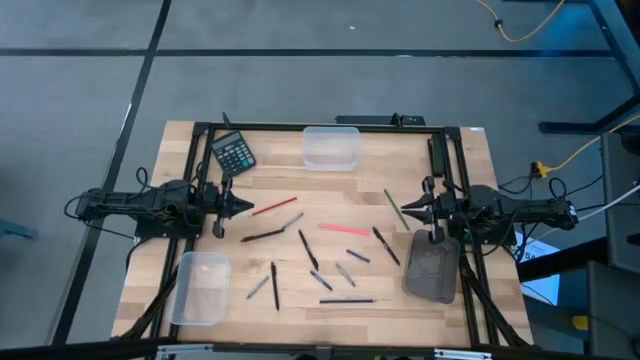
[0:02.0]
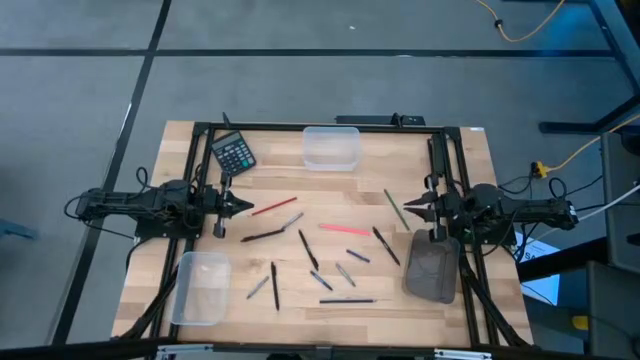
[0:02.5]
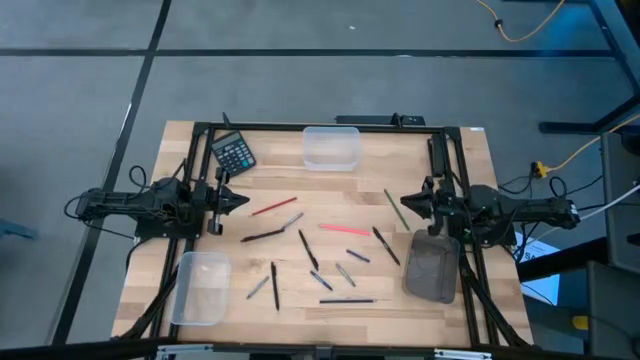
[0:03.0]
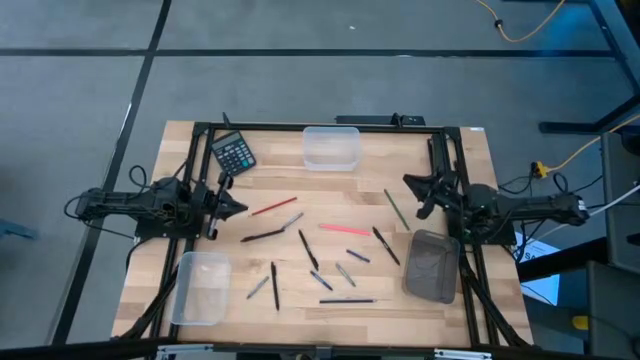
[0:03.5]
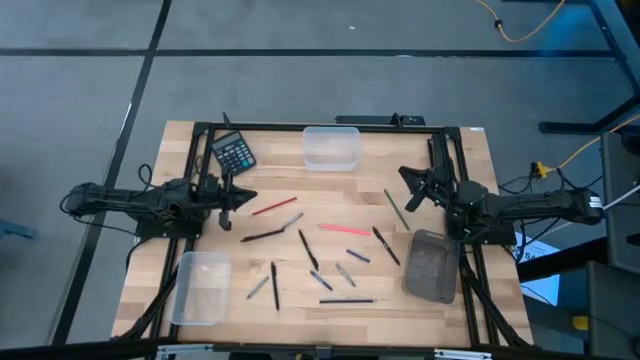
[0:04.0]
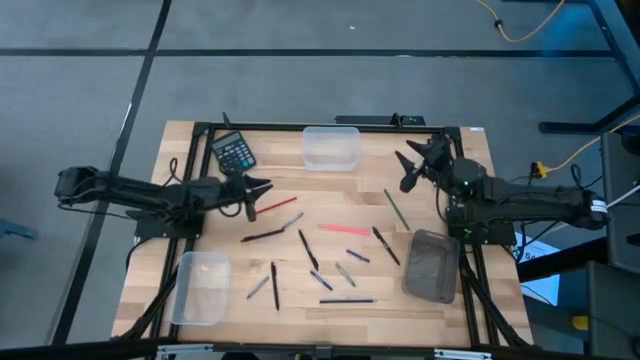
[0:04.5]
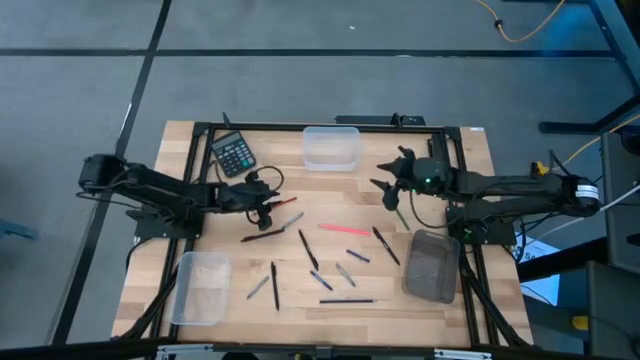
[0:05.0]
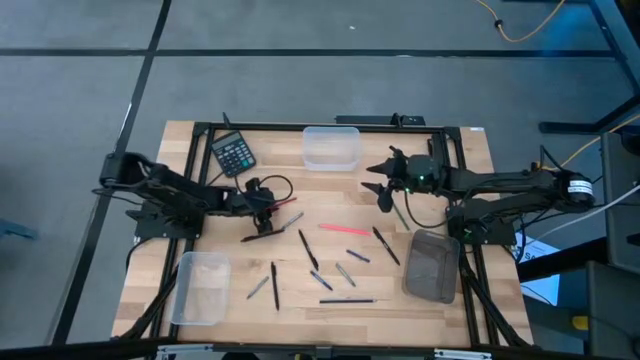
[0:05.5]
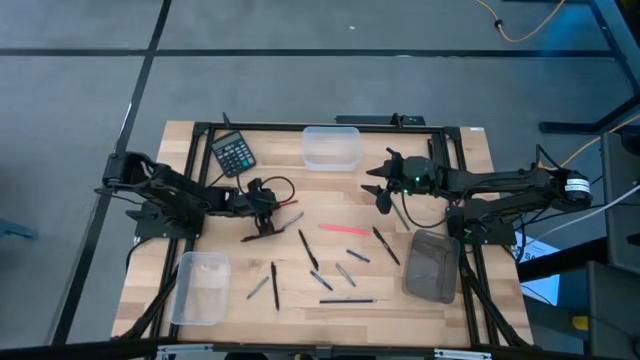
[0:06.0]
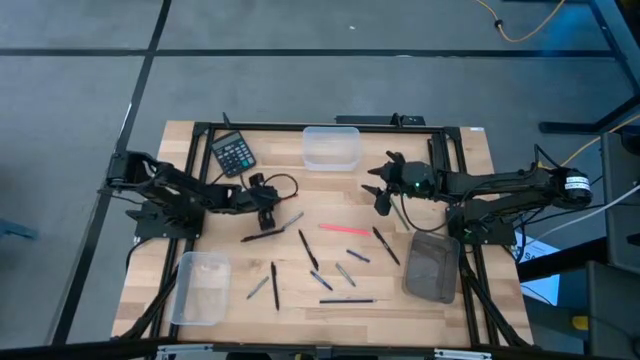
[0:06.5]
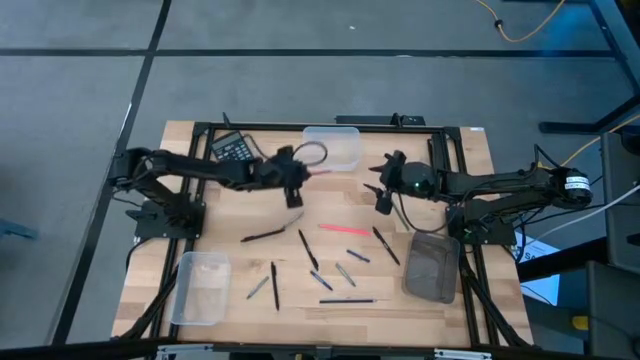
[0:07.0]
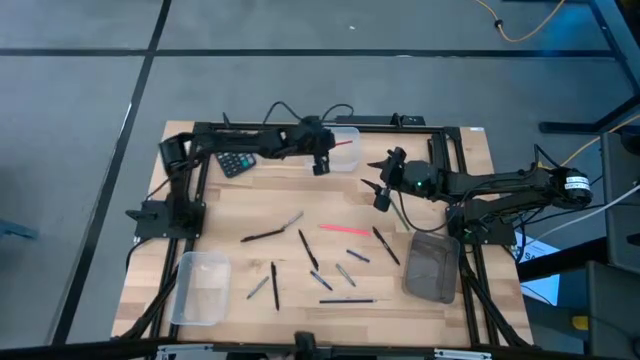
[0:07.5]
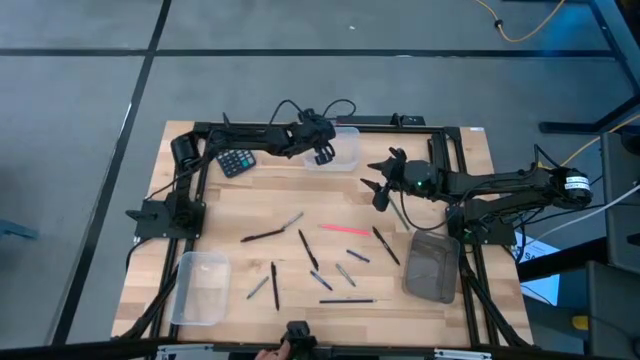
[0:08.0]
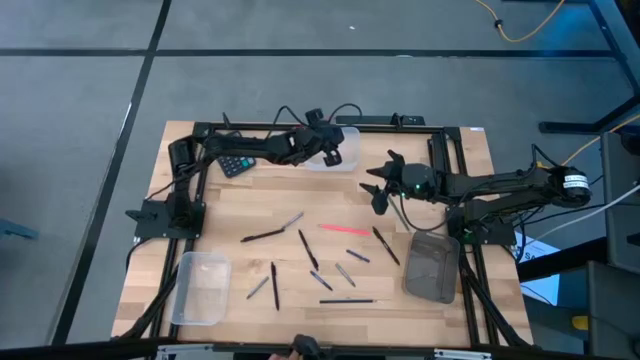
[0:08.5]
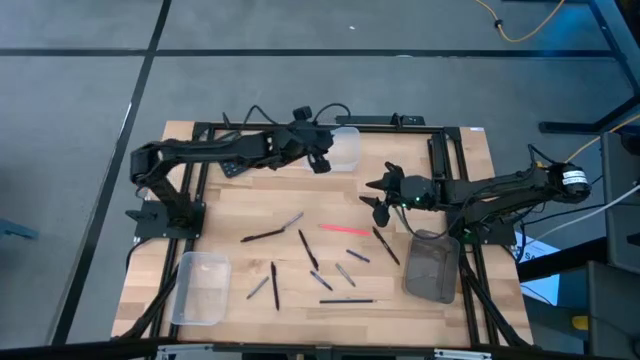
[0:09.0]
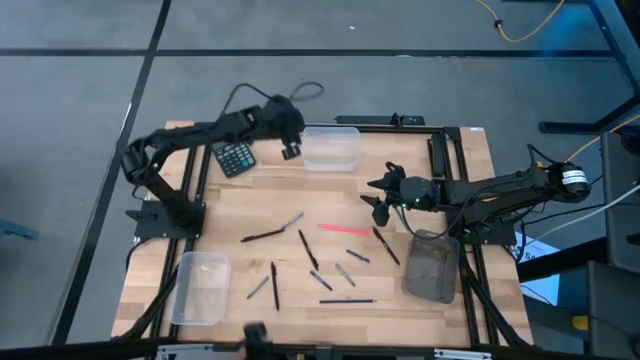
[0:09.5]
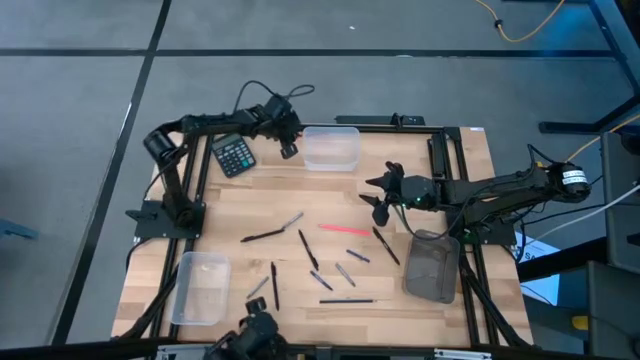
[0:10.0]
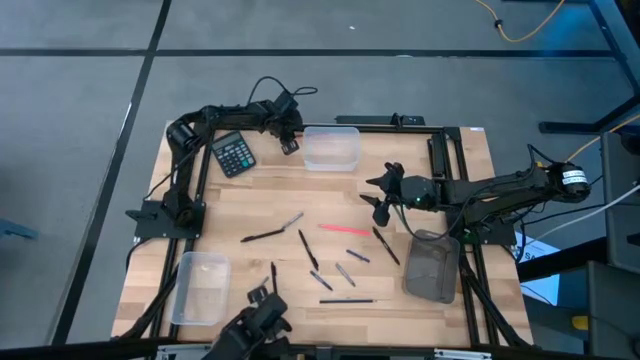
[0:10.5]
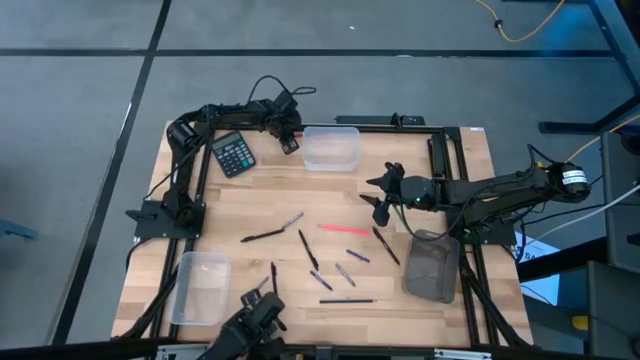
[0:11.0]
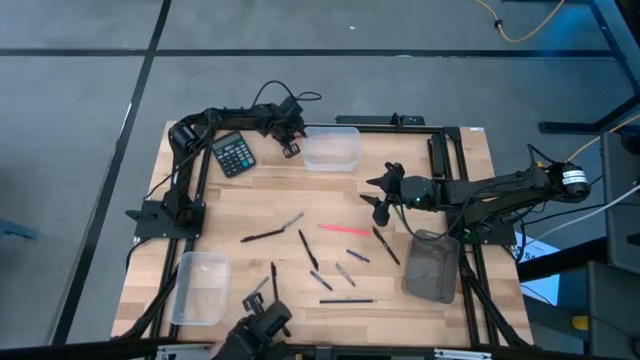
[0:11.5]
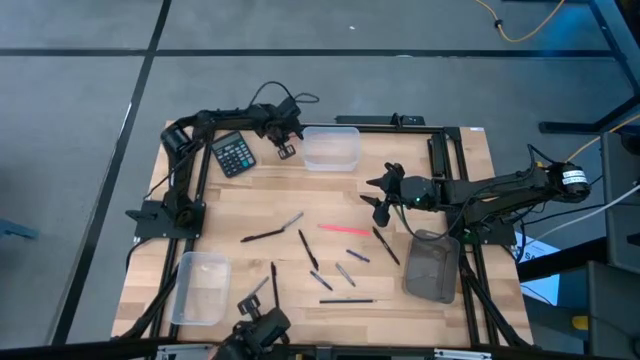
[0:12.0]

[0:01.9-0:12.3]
Task: Sort crayons/erasers/pens/pencils in bins
Put the red pencil into the top transparent bin

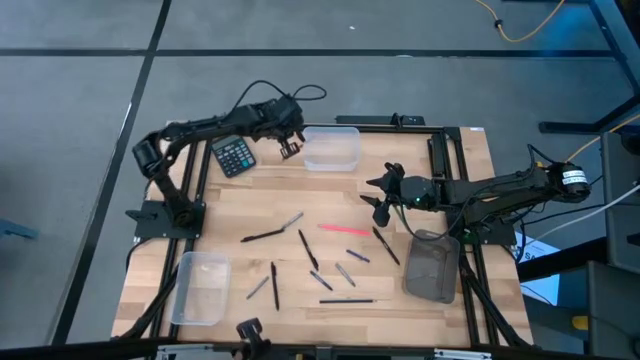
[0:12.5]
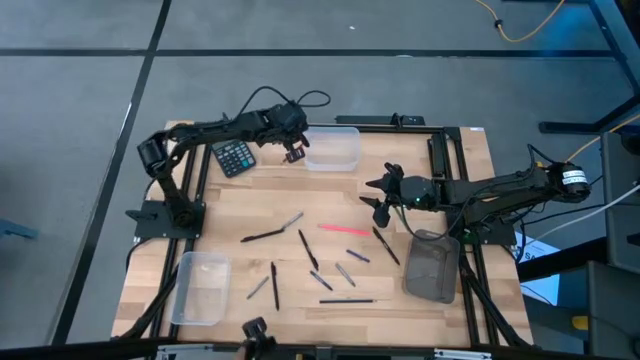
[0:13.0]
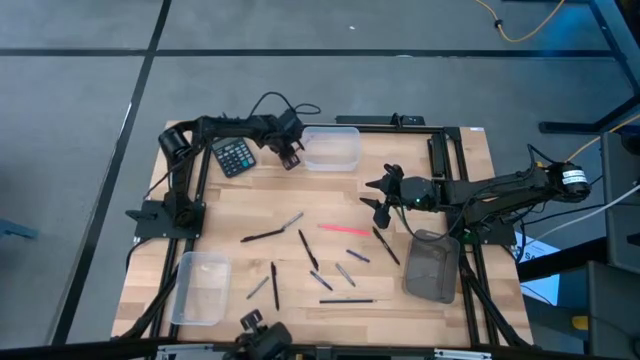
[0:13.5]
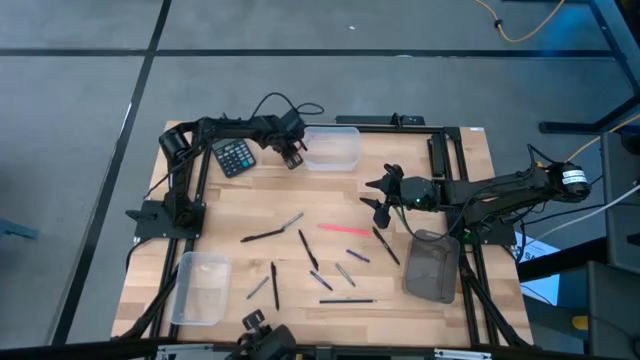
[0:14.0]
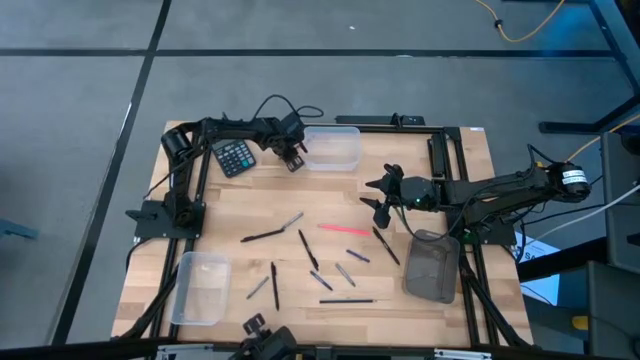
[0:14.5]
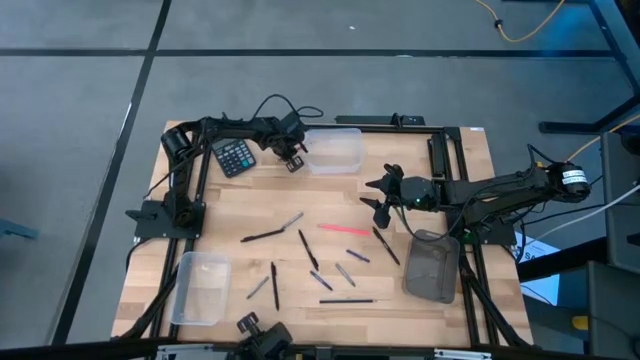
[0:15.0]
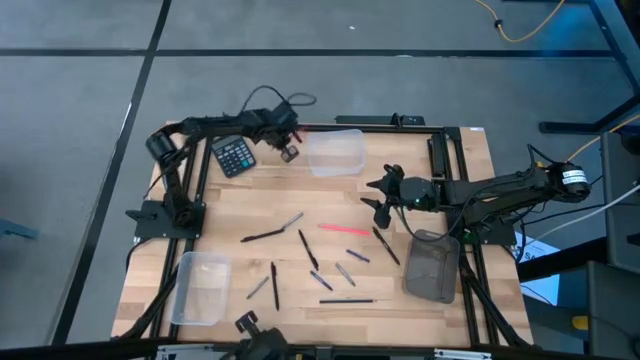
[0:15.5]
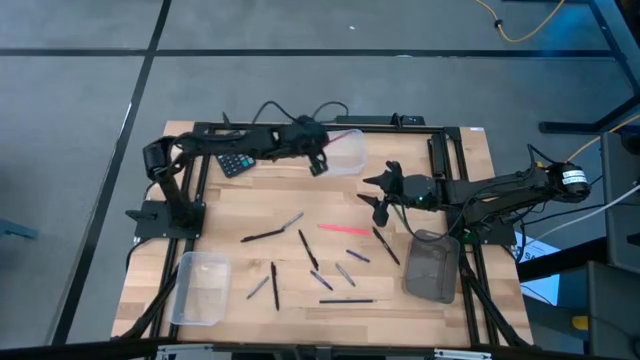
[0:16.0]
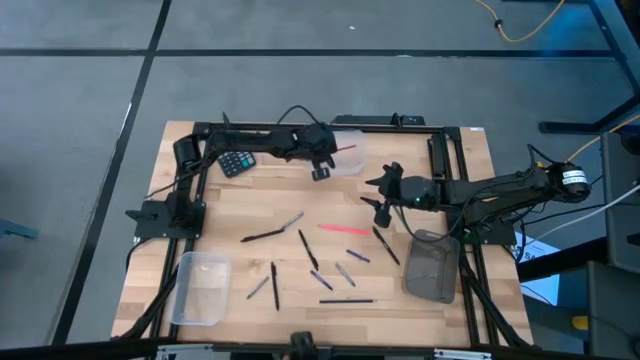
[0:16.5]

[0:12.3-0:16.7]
Put the red pencil into the top transparent bin

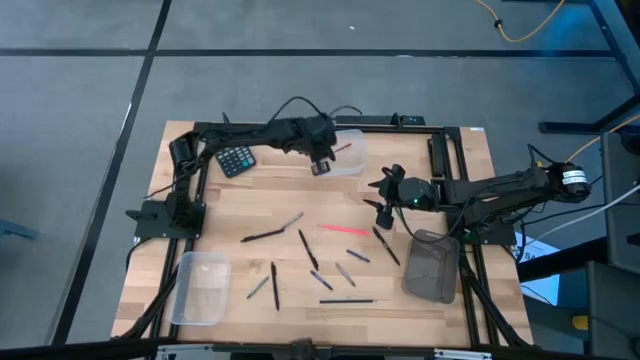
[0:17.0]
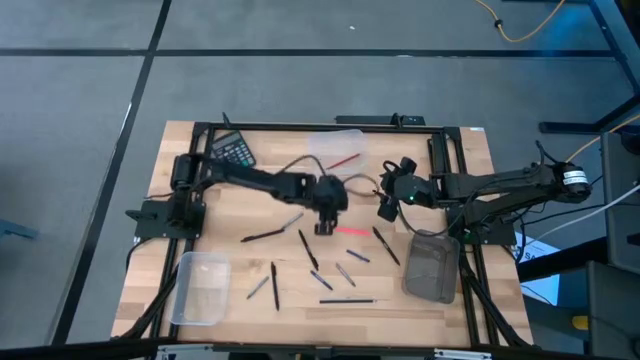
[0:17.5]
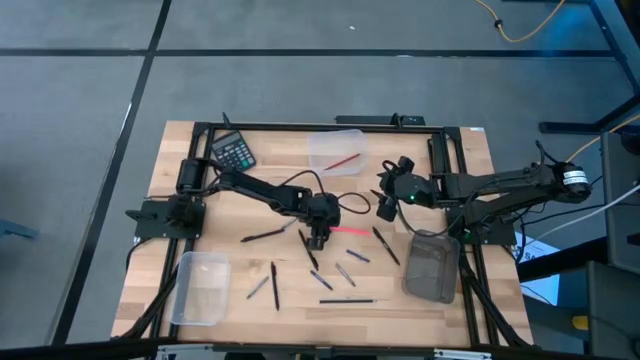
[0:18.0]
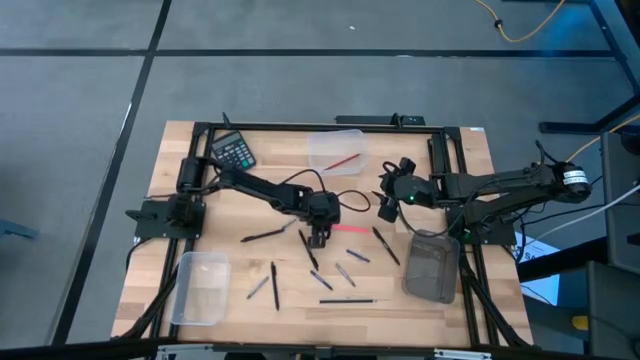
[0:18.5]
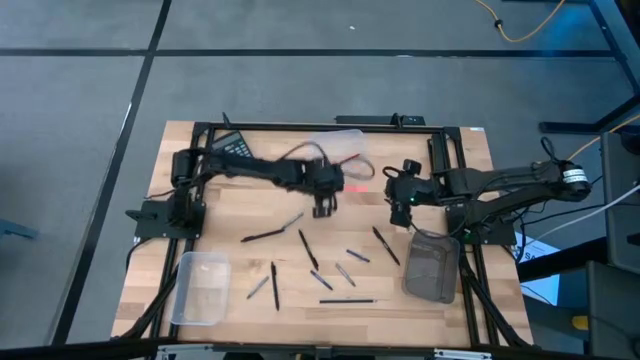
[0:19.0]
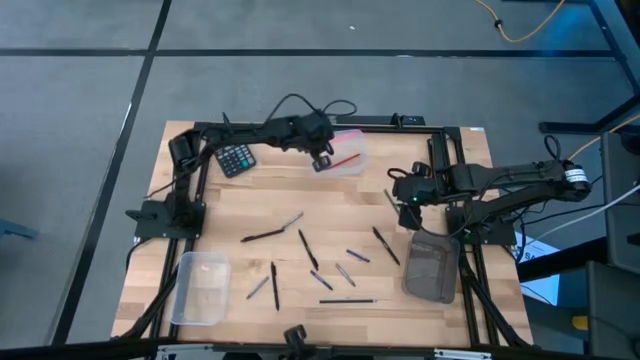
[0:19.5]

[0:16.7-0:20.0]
Put the pink pencil into the top transparent bin

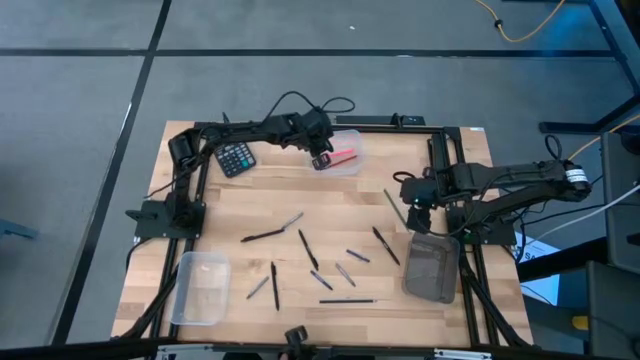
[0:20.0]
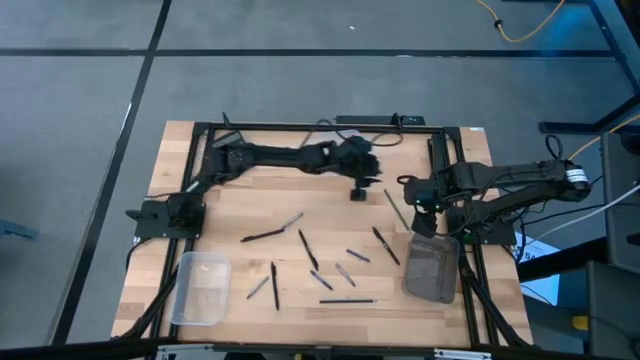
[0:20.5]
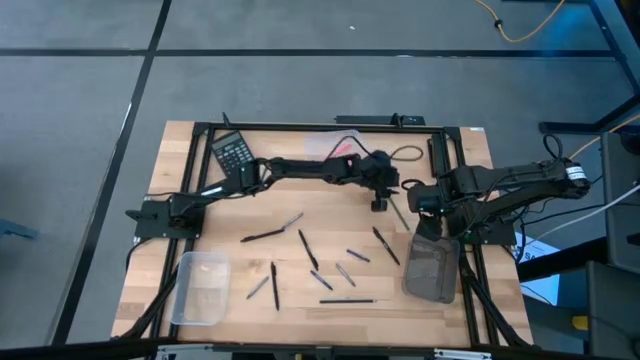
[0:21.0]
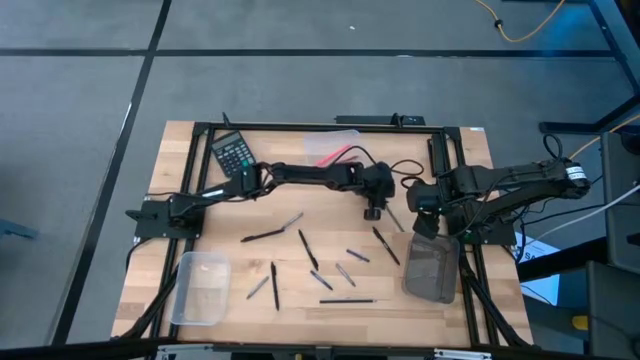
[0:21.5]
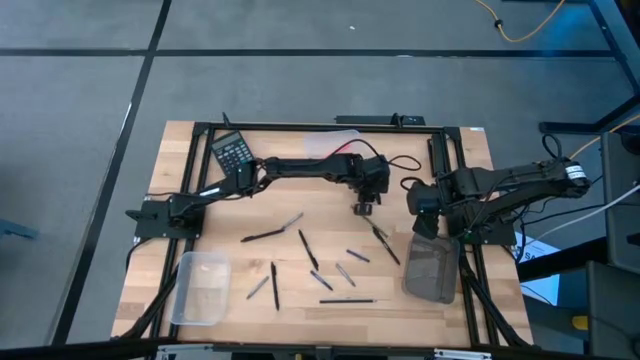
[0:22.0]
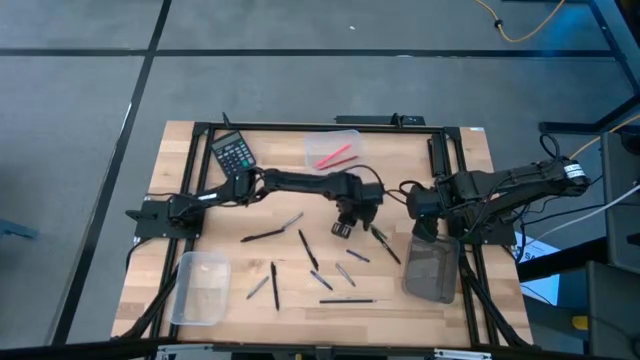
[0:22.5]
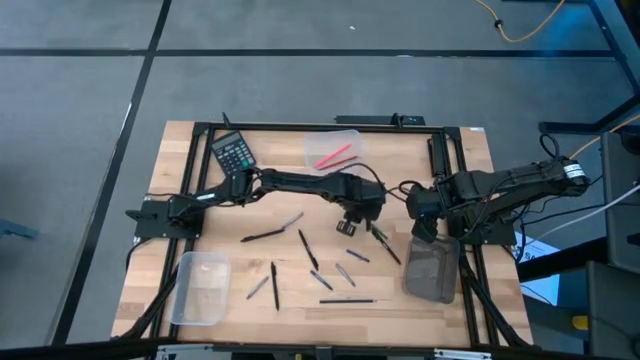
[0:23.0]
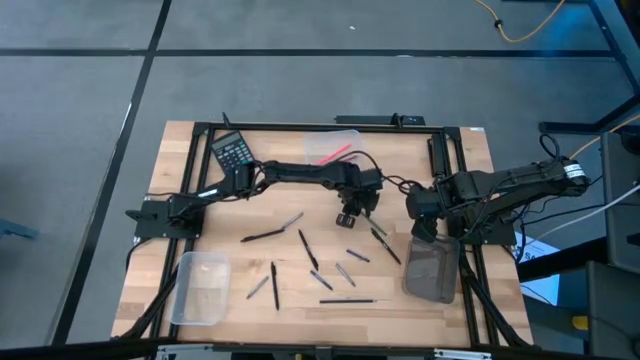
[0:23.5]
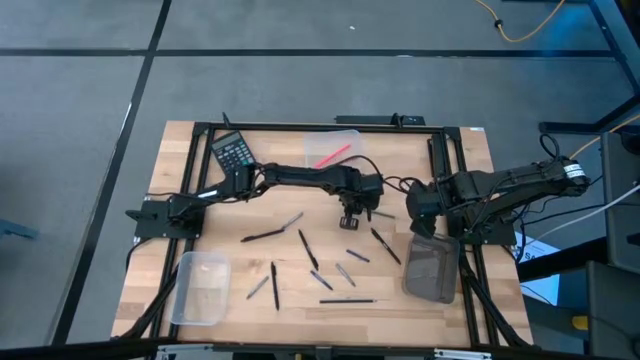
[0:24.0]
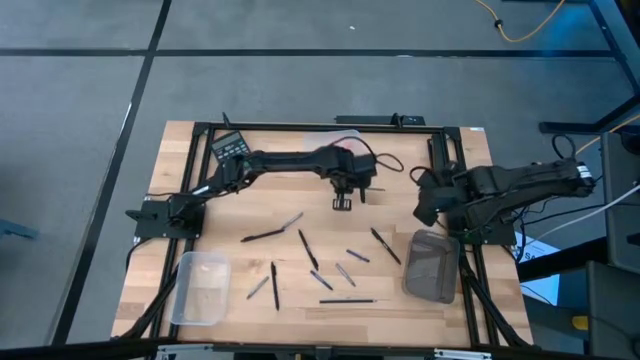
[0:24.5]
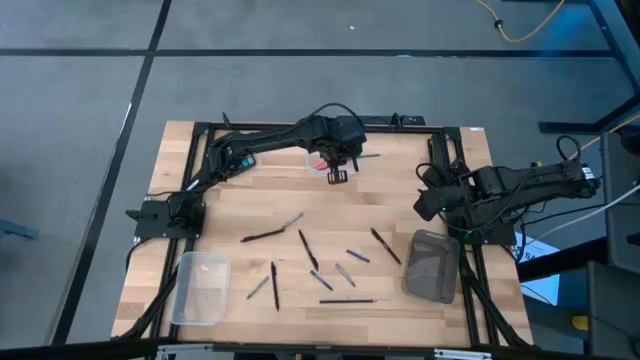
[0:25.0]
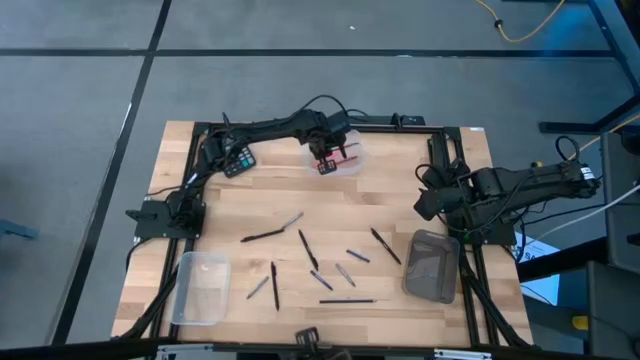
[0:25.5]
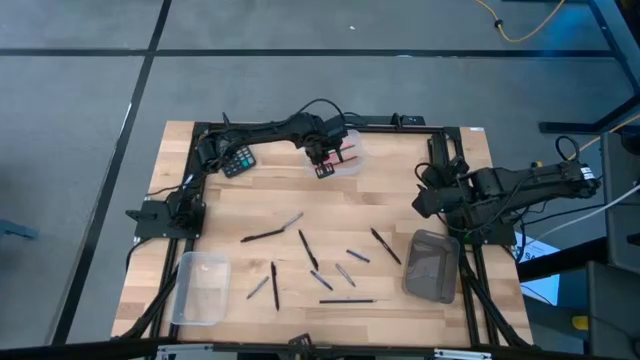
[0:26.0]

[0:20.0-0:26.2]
Put the green pencil into the top transparent bin
